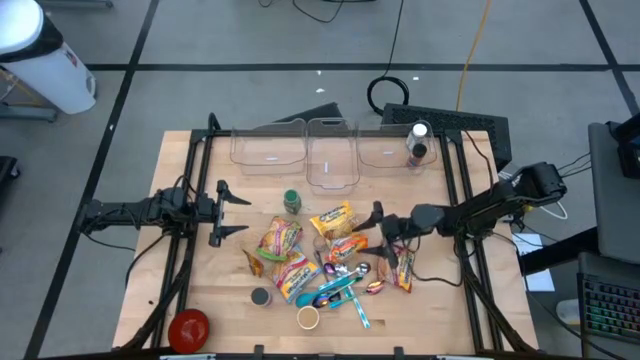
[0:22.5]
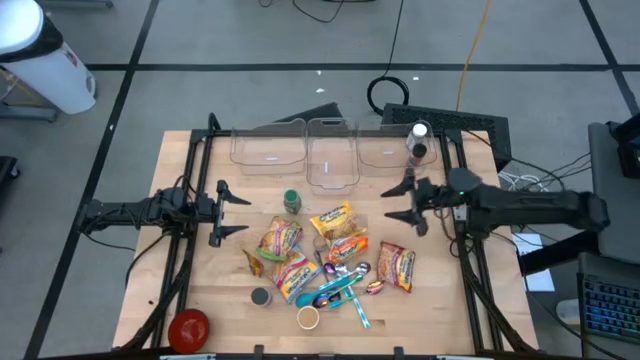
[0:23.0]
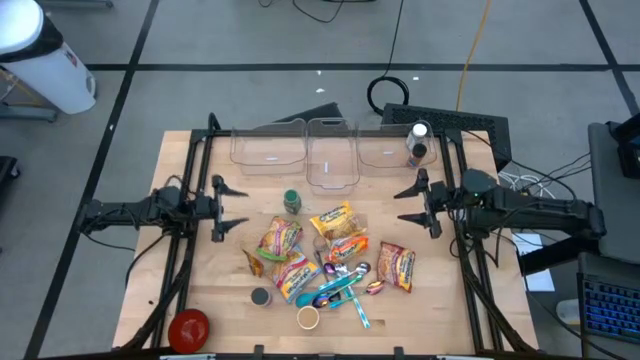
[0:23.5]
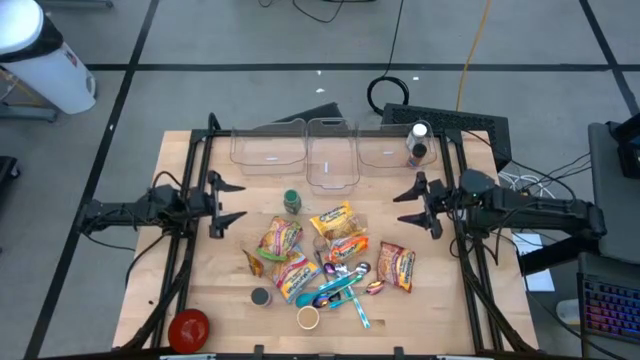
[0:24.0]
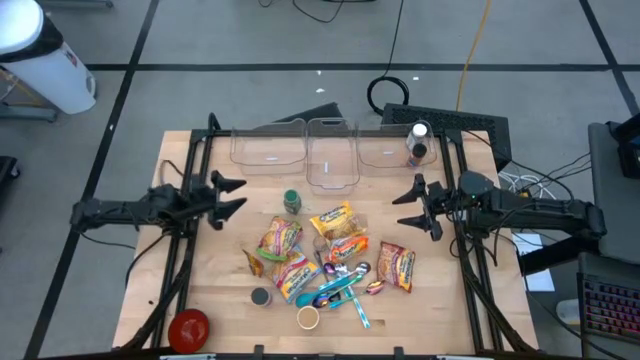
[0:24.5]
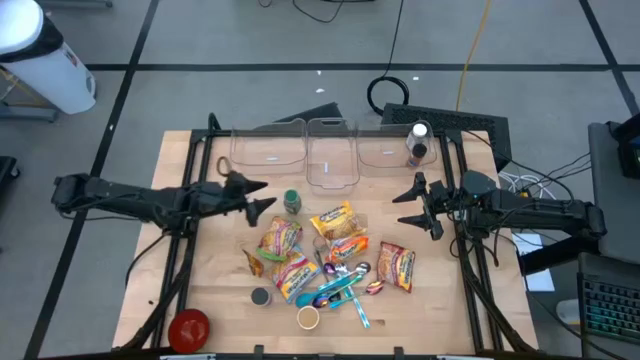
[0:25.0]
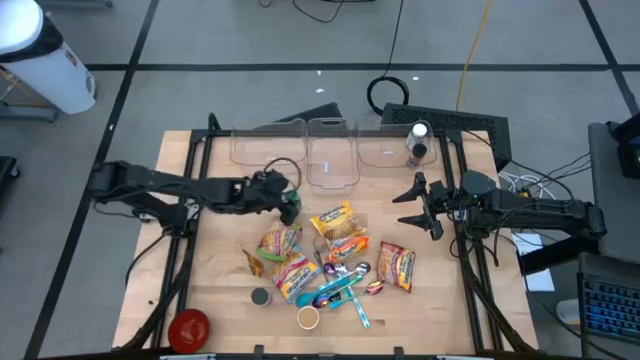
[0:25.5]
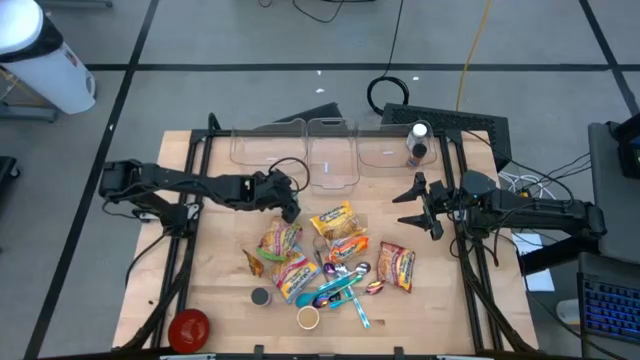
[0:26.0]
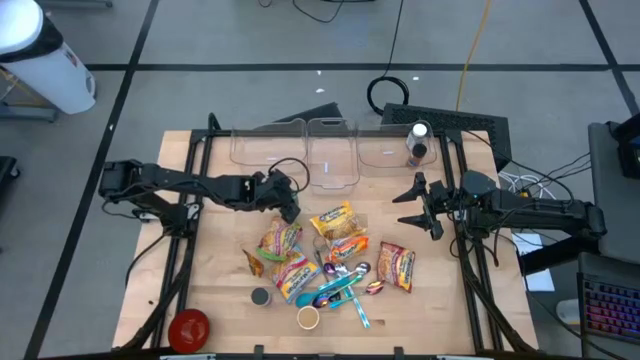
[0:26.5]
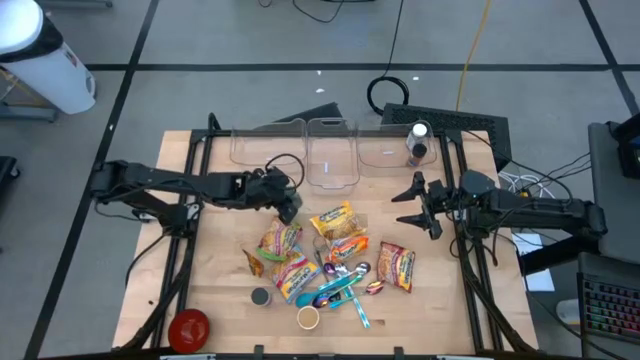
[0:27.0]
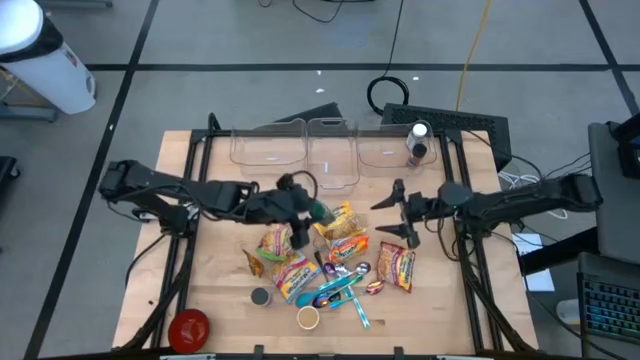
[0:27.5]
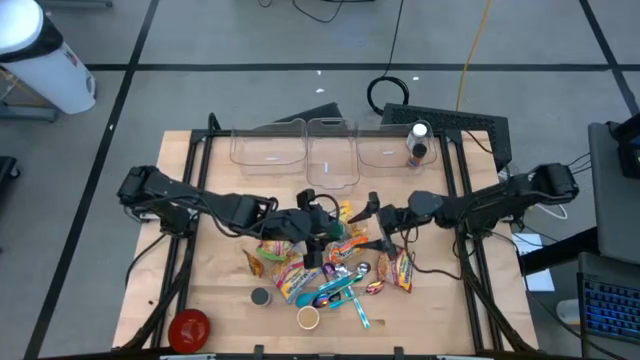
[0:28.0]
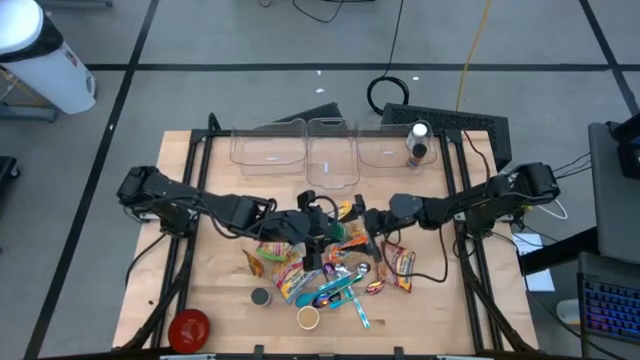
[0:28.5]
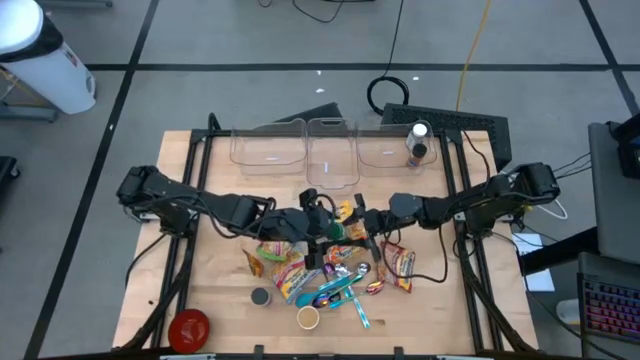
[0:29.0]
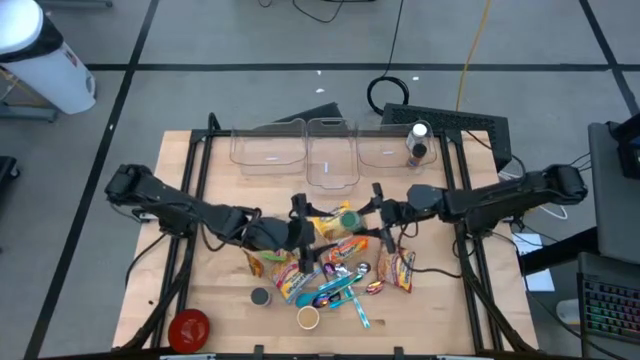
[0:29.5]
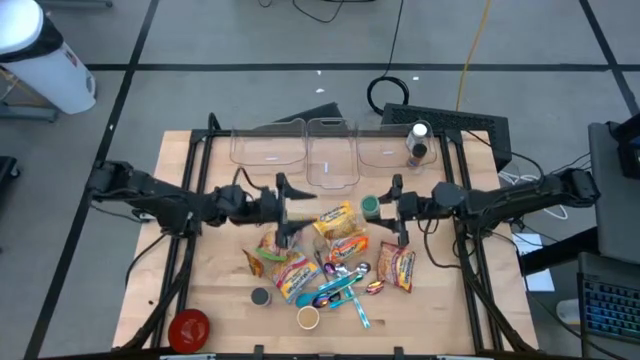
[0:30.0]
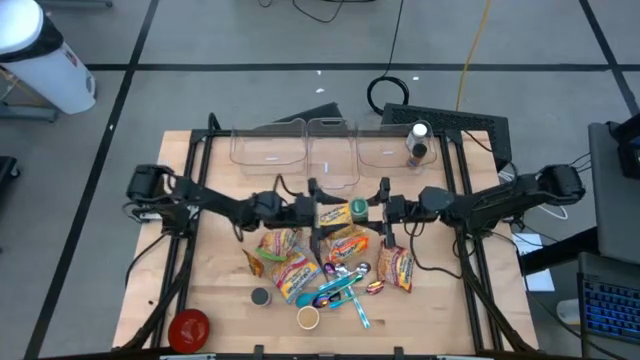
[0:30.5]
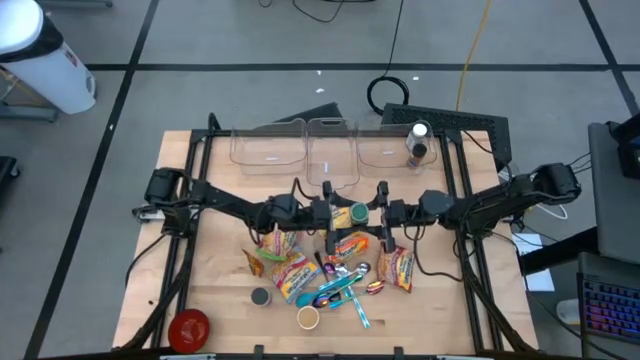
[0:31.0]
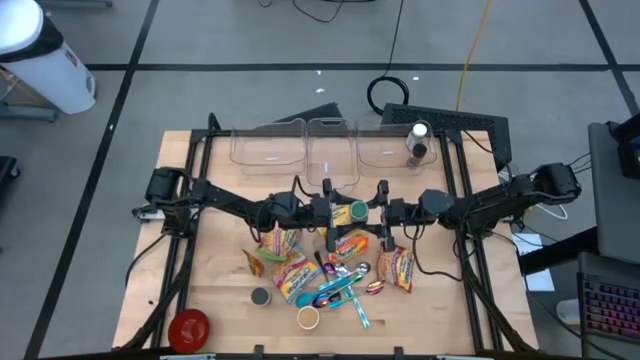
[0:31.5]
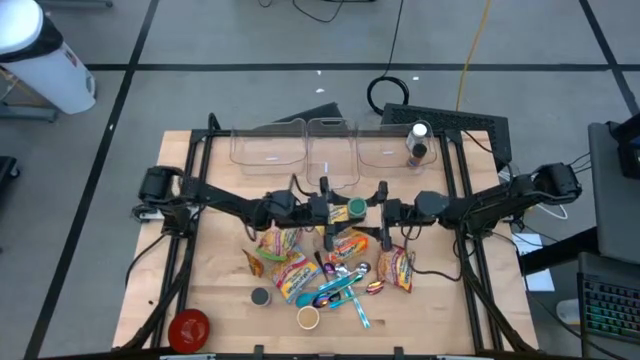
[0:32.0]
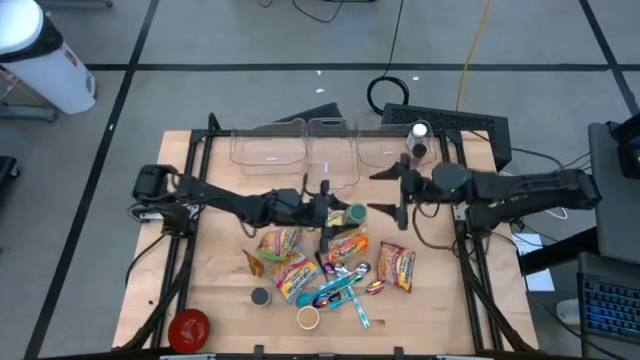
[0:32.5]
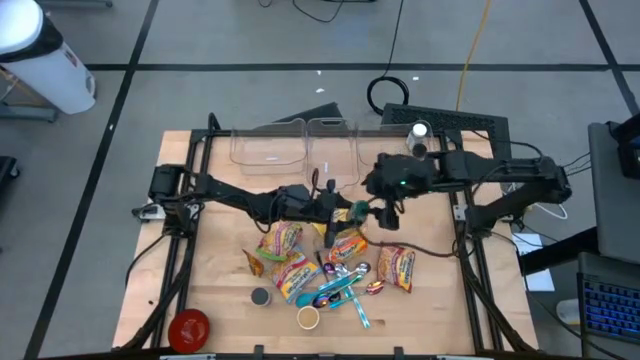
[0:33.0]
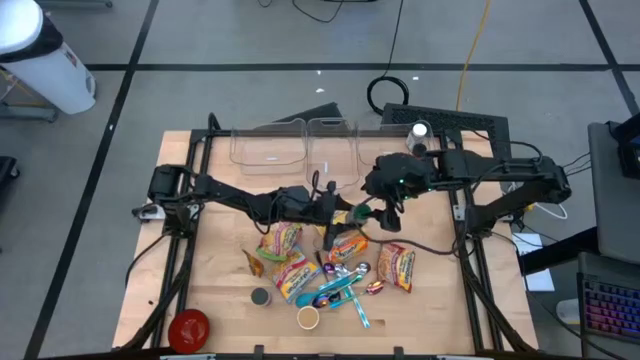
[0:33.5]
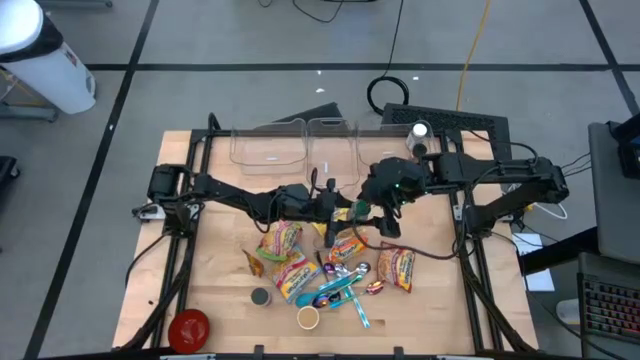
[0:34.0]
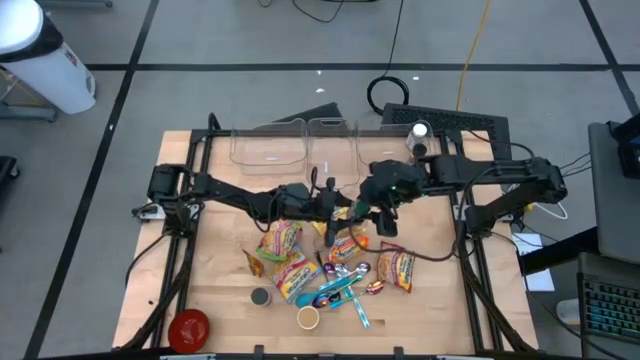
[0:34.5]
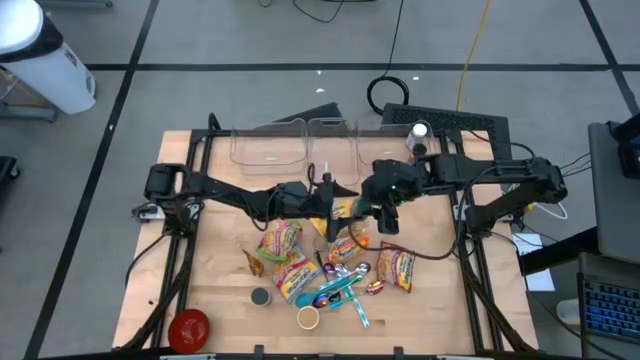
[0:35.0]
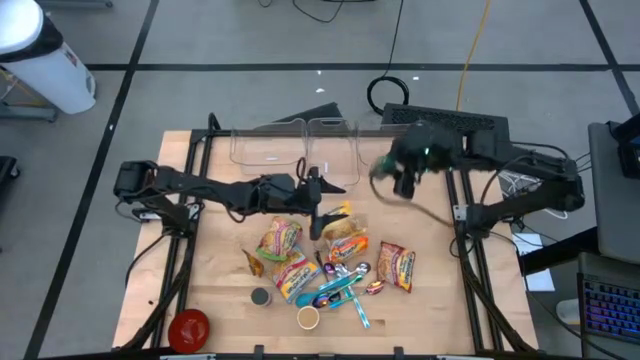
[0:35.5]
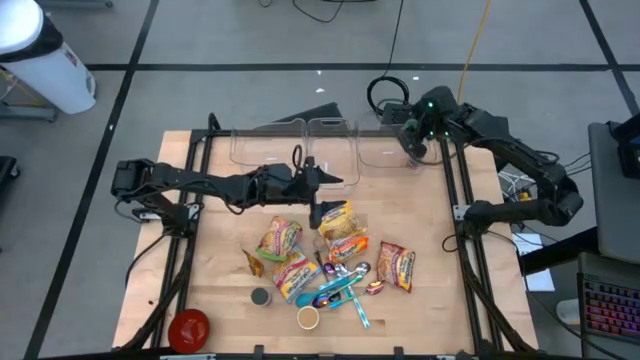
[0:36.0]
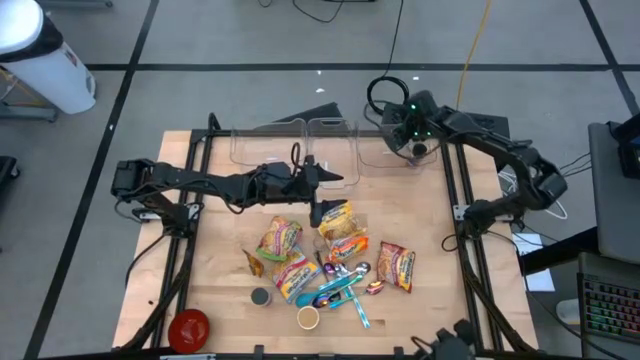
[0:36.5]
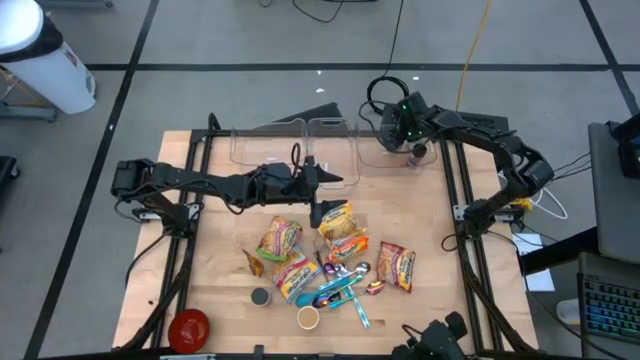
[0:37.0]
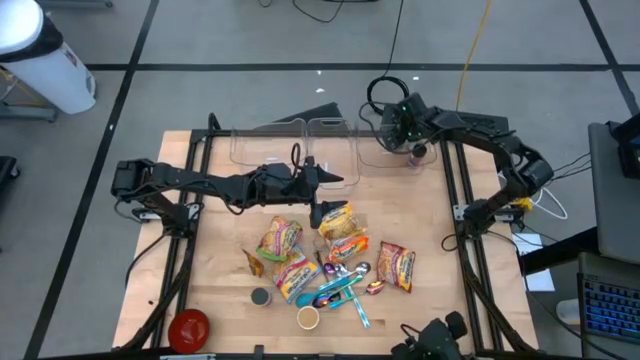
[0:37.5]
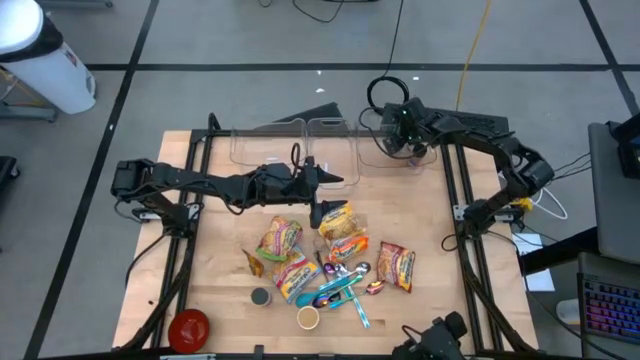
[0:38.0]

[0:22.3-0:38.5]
Task: Pick & Place Food Item
Put the green seasoning bottle into the right transparent bin

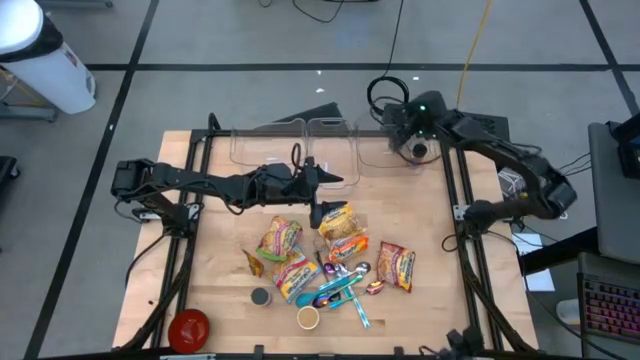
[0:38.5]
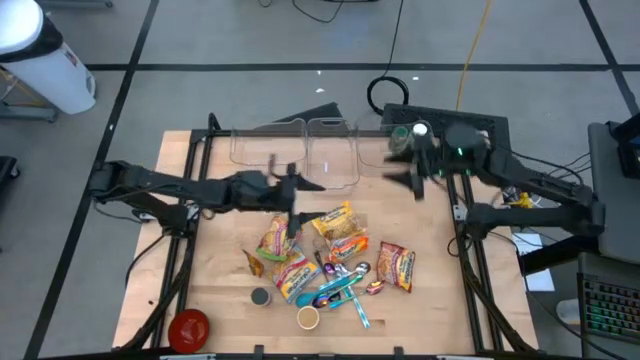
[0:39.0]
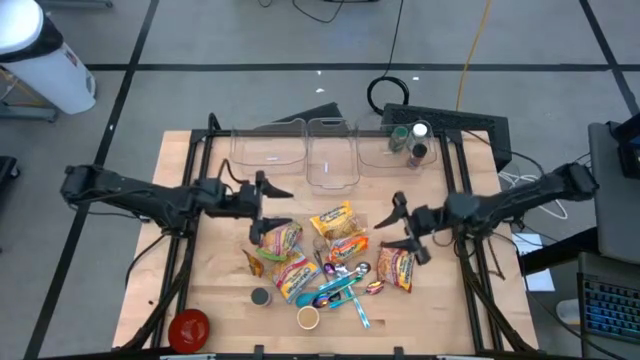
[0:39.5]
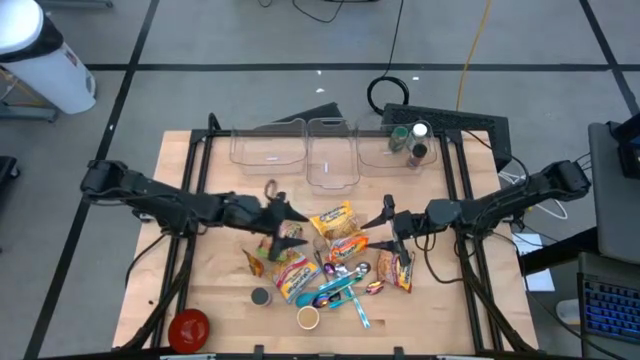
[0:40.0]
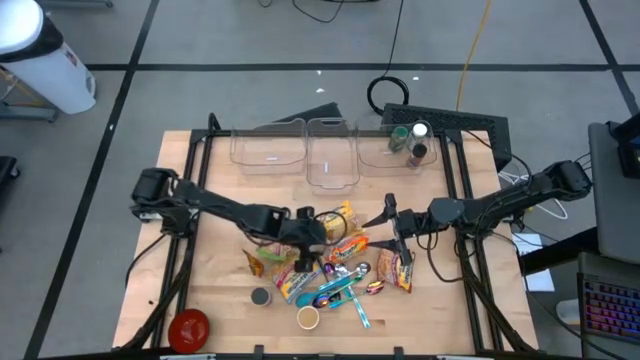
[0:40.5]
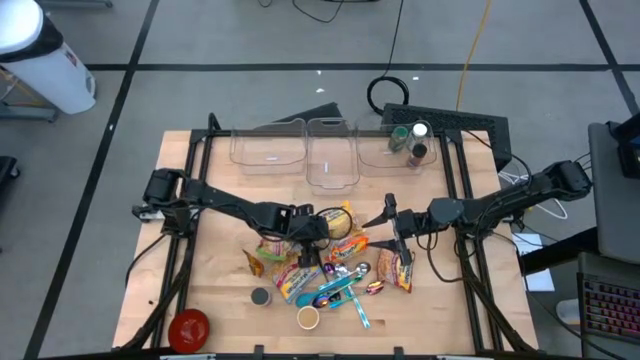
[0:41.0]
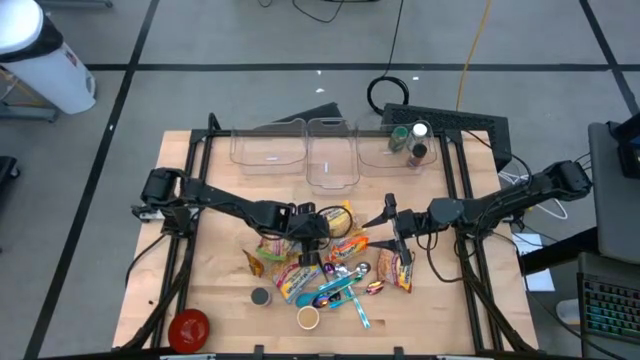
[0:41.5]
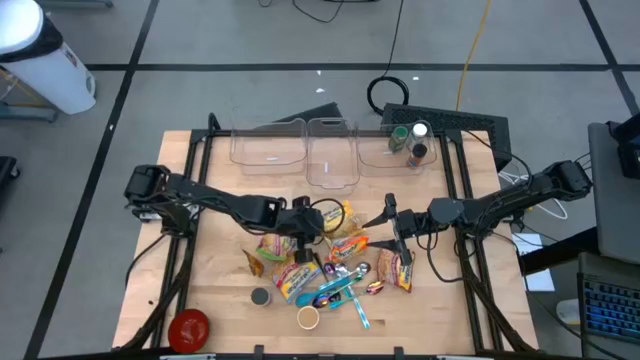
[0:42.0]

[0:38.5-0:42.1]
Put the brown seasoning bottle into the right transparent bin

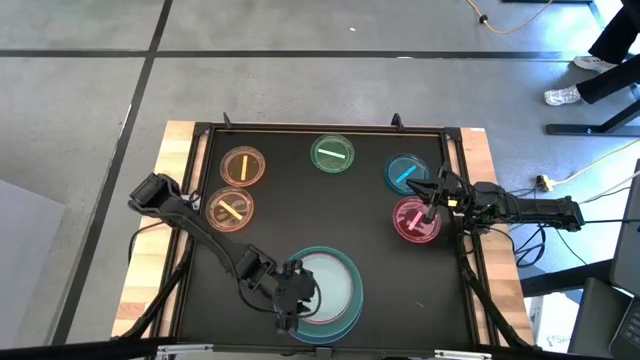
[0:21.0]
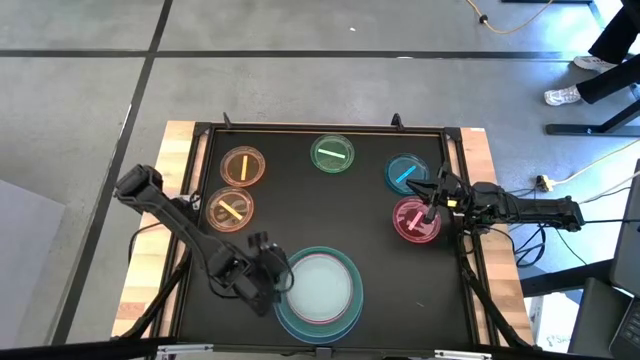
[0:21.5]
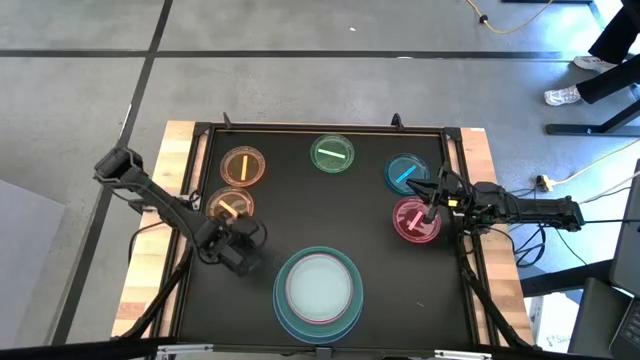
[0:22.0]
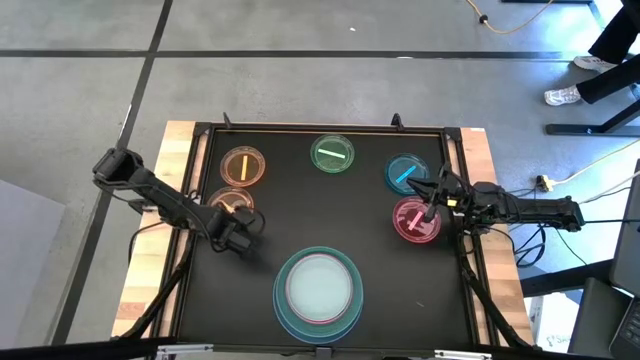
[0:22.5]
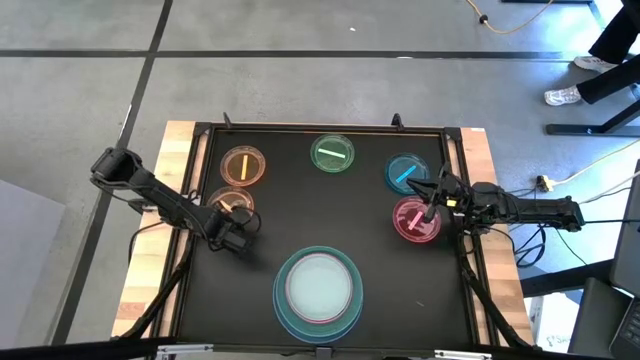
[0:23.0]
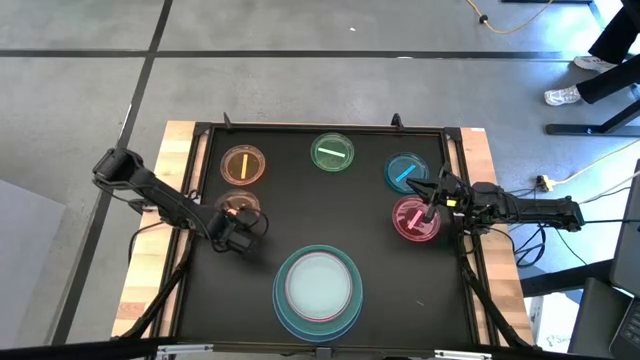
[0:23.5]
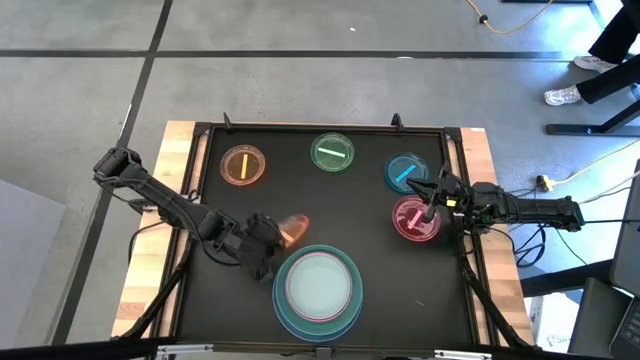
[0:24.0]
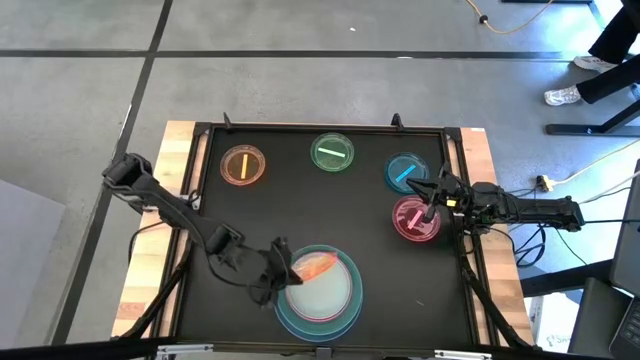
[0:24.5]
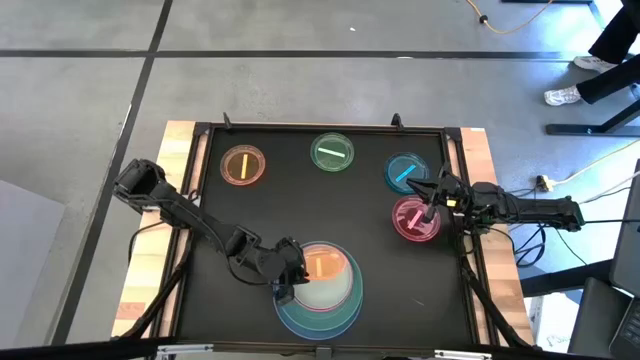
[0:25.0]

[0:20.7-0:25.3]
Task: Stack plastic plates
Stack the bottom orange plate on the white plate
